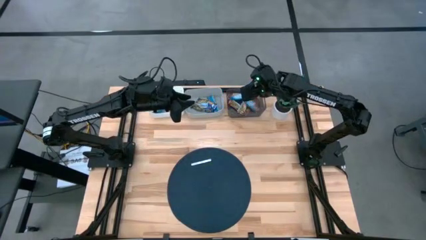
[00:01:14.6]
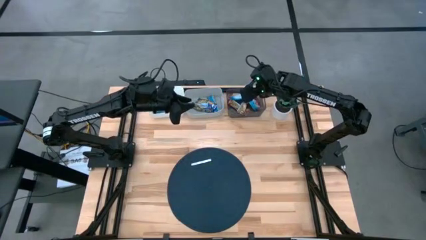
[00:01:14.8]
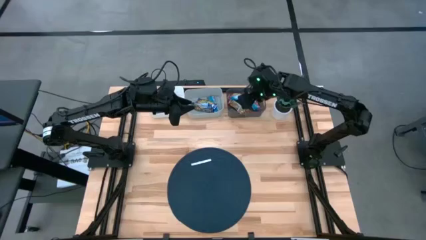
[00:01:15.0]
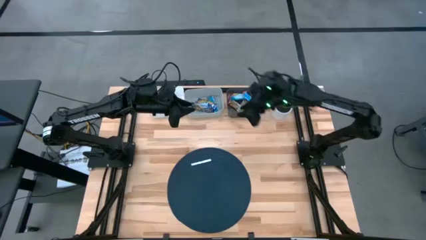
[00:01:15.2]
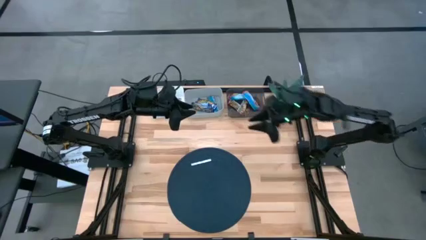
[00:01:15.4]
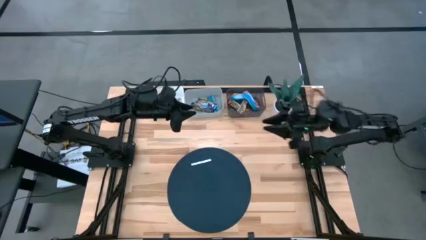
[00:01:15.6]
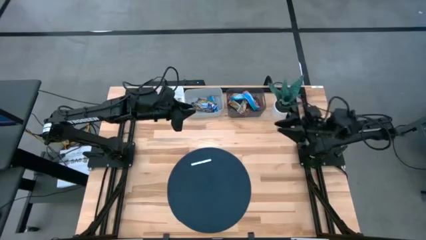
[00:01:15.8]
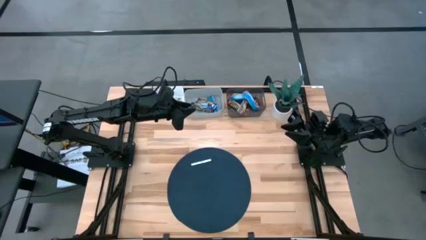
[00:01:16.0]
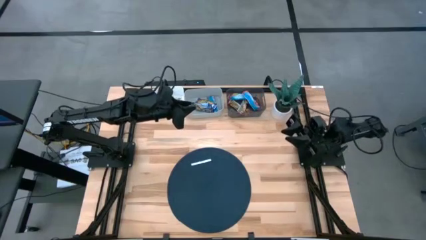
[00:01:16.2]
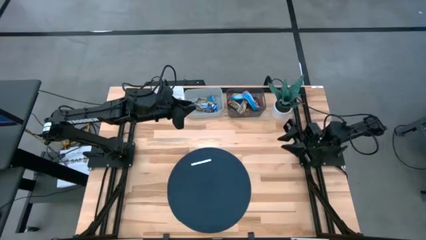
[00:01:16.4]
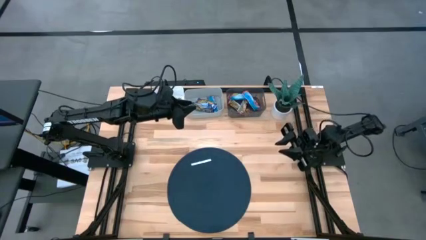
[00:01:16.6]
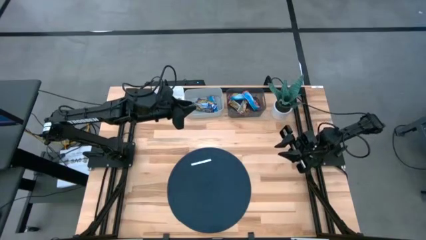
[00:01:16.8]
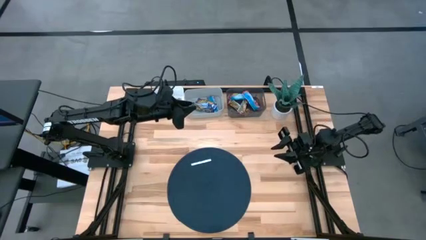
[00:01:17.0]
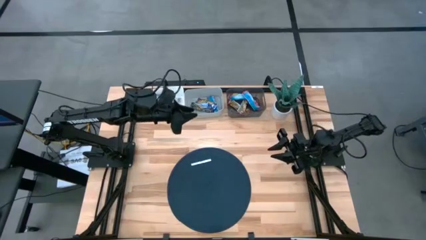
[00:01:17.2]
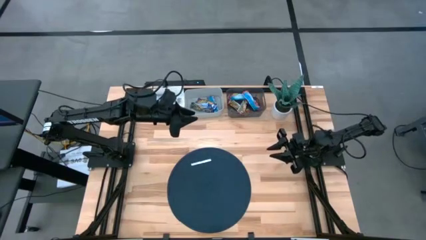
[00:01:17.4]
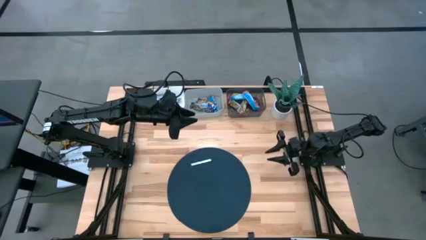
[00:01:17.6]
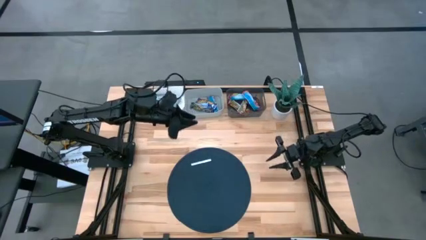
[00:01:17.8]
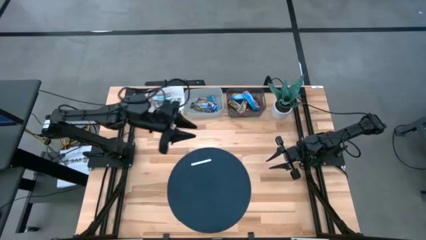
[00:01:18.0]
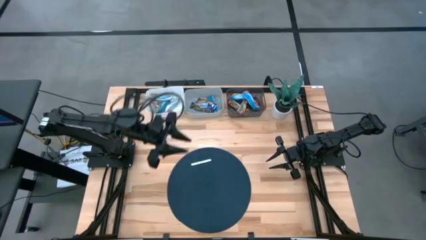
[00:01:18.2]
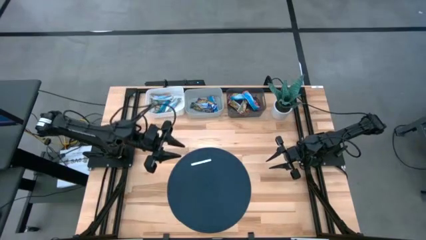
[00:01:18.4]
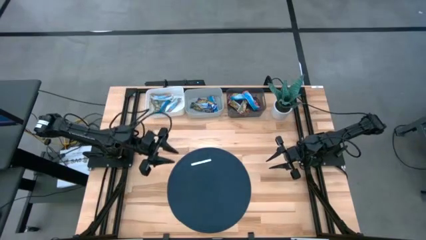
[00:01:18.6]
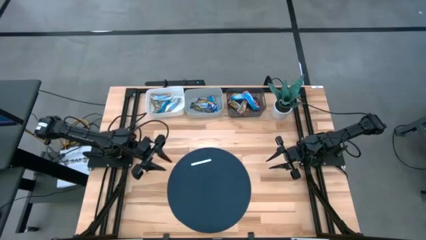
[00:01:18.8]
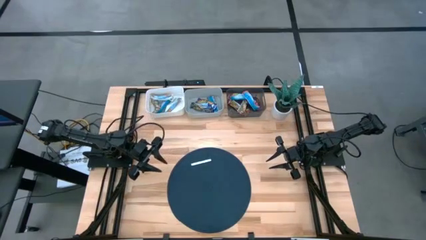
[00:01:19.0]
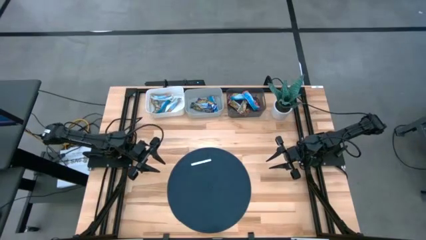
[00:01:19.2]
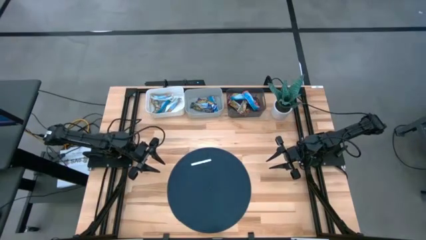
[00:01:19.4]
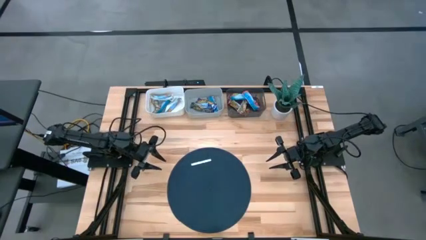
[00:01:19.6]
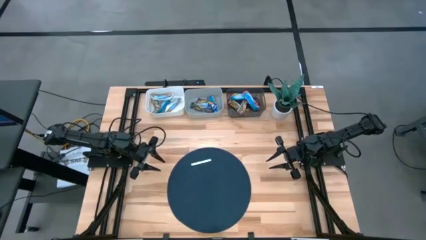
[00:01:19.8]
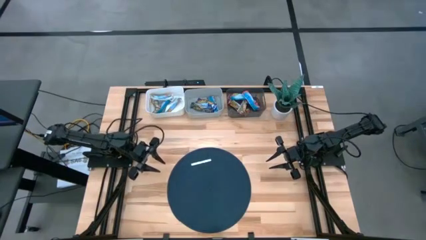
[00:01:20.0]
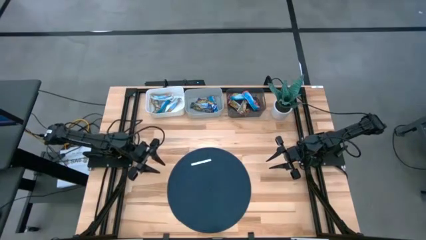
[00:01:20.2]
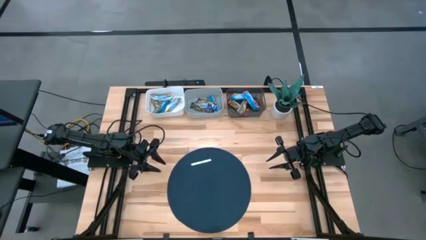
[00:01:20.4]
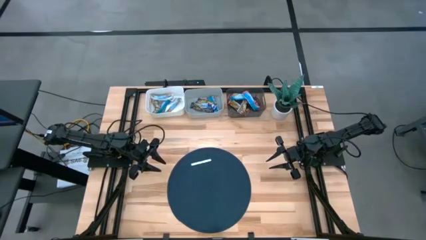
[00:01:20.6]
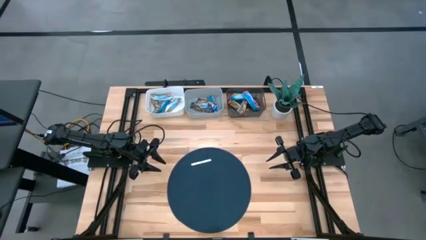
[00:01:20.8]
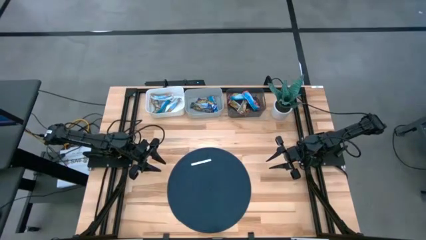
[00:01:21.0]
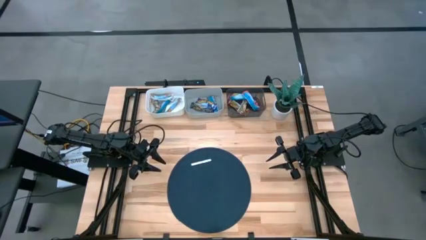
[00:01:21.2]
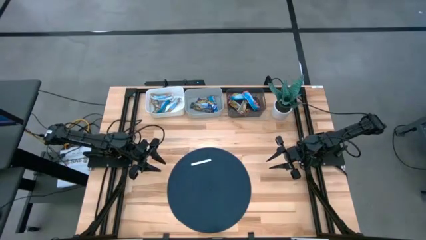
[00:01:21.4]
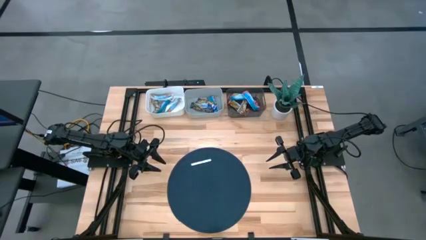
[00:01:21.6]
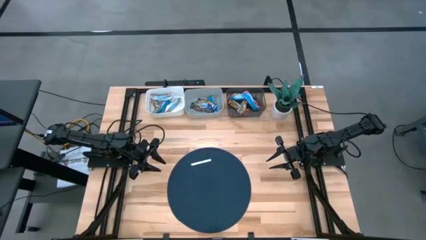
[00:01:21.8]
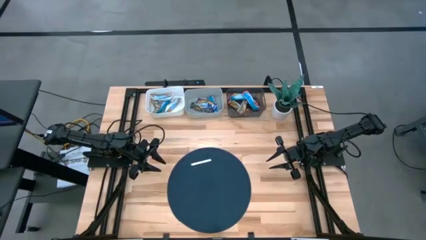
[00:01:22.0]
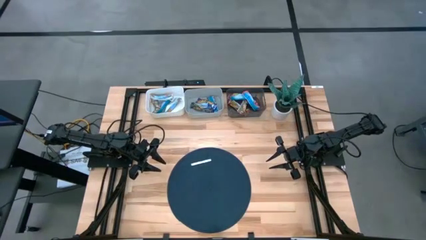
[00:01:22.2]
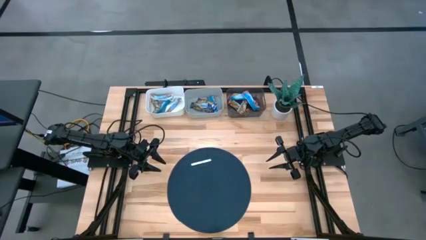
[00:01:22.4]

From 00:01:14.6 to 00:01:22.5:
Task: Pick and place Granola Bars by type
Return to Home Position

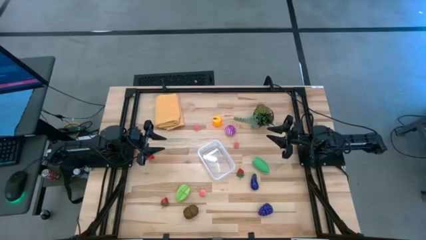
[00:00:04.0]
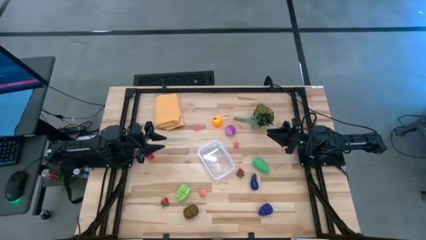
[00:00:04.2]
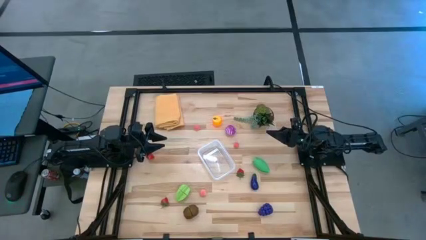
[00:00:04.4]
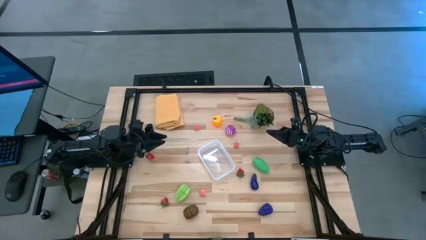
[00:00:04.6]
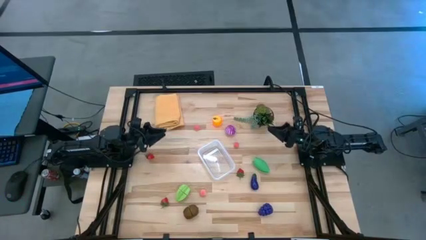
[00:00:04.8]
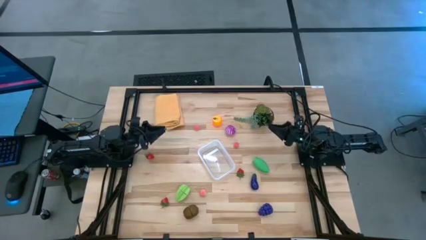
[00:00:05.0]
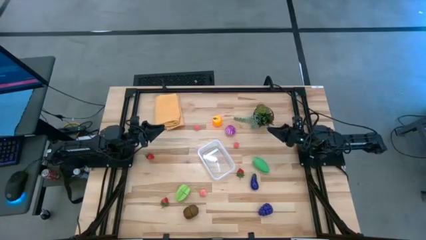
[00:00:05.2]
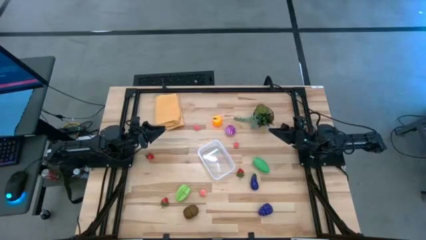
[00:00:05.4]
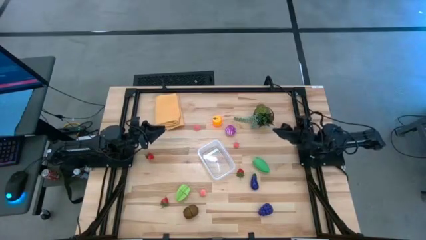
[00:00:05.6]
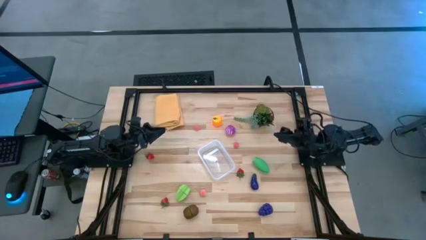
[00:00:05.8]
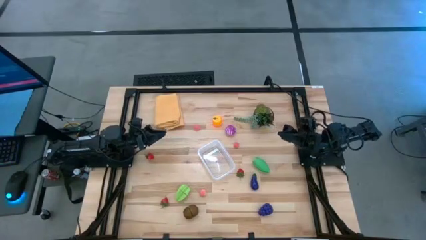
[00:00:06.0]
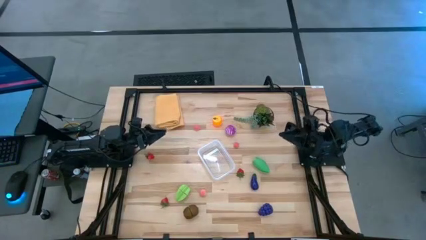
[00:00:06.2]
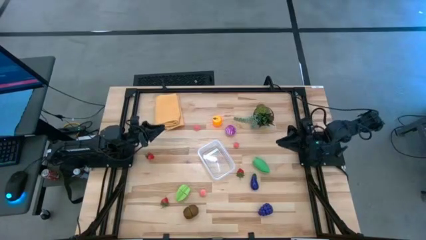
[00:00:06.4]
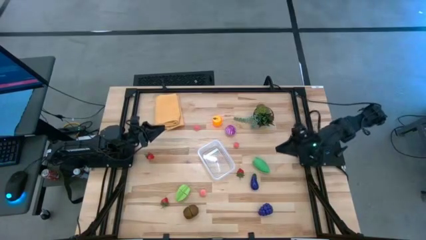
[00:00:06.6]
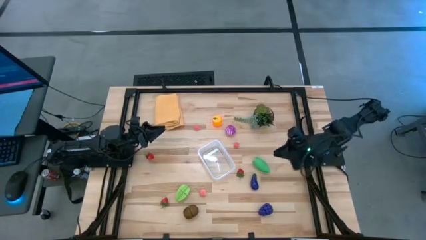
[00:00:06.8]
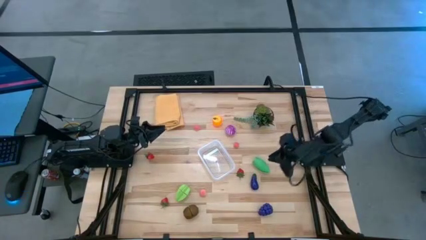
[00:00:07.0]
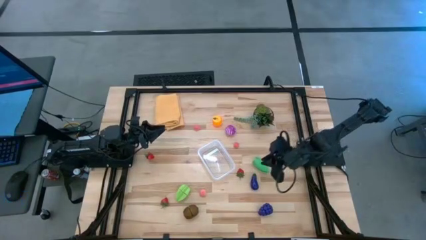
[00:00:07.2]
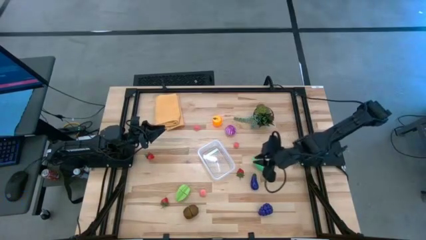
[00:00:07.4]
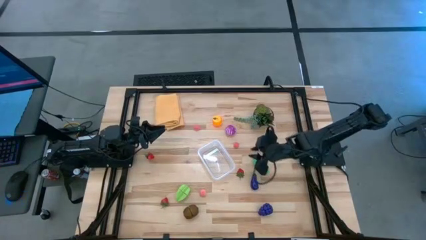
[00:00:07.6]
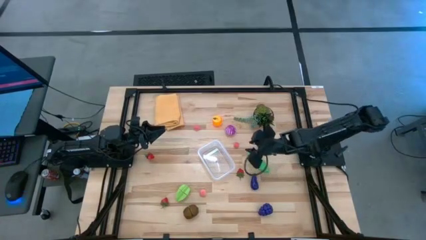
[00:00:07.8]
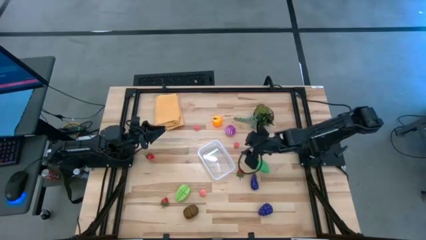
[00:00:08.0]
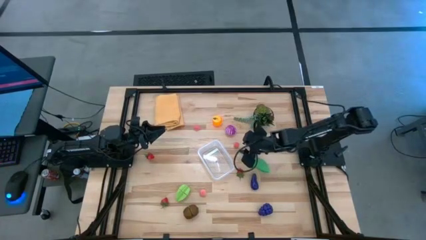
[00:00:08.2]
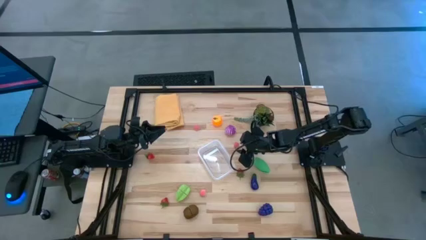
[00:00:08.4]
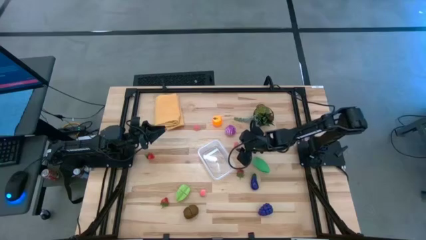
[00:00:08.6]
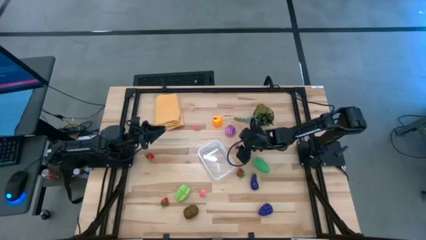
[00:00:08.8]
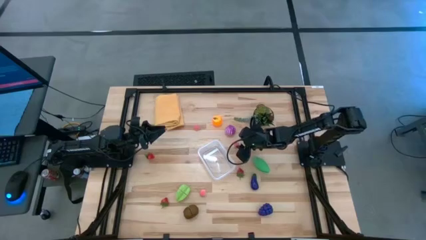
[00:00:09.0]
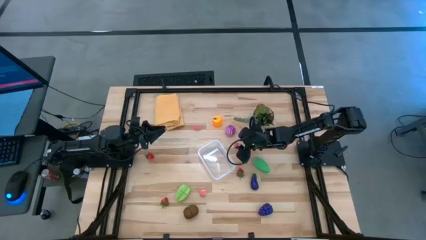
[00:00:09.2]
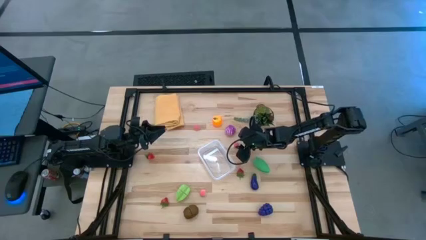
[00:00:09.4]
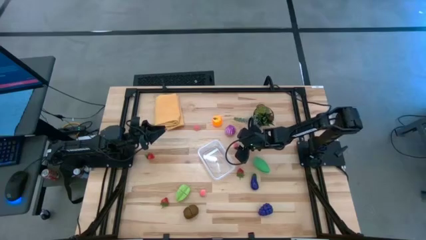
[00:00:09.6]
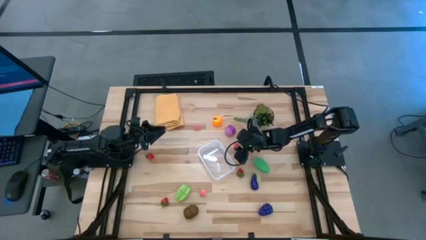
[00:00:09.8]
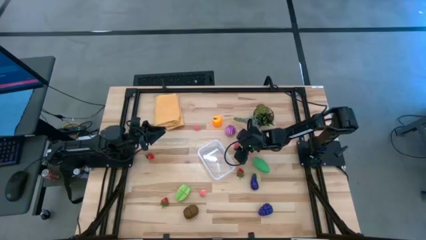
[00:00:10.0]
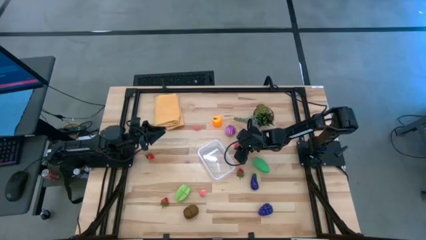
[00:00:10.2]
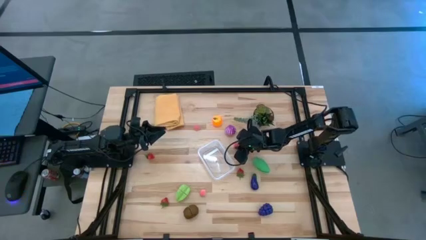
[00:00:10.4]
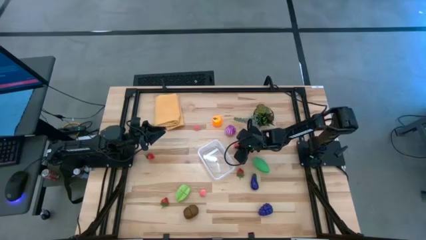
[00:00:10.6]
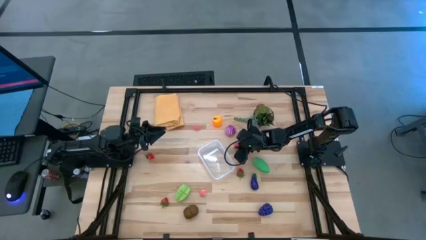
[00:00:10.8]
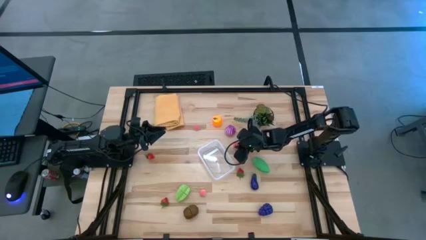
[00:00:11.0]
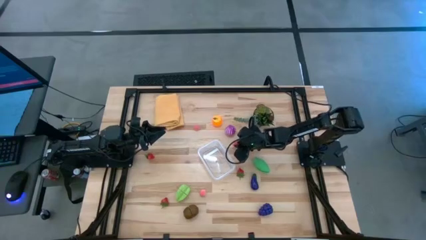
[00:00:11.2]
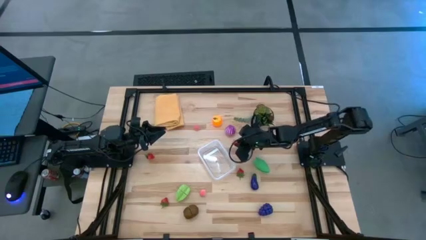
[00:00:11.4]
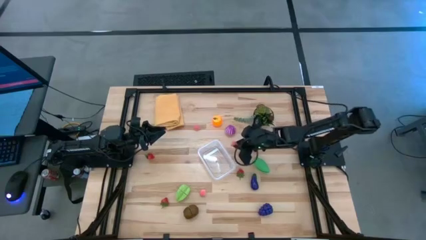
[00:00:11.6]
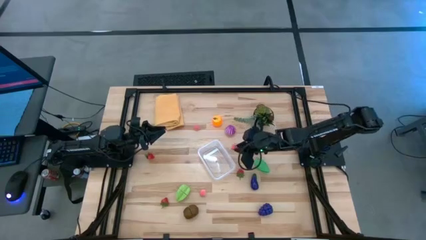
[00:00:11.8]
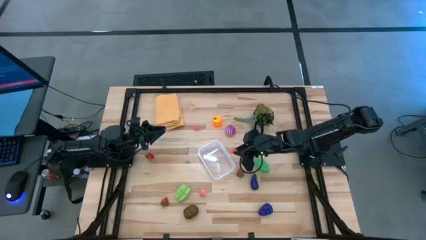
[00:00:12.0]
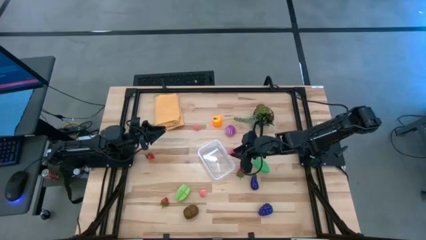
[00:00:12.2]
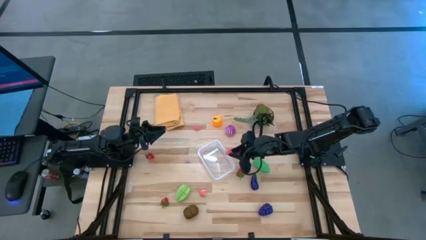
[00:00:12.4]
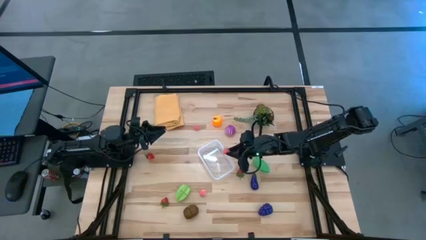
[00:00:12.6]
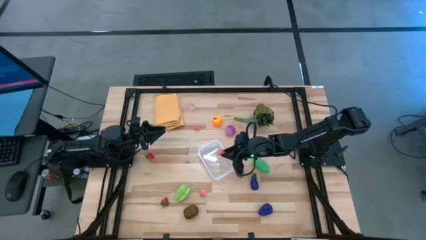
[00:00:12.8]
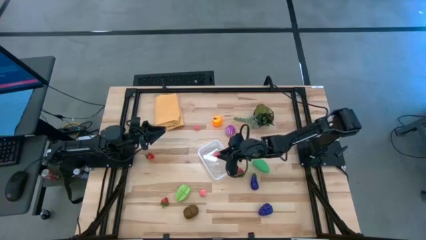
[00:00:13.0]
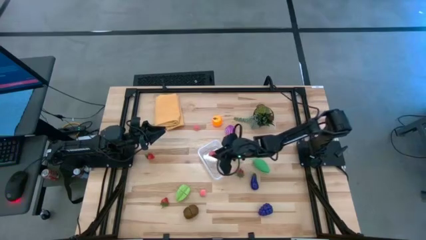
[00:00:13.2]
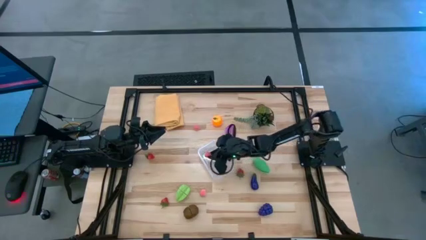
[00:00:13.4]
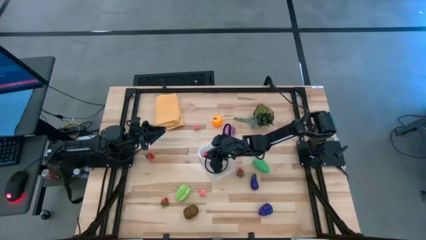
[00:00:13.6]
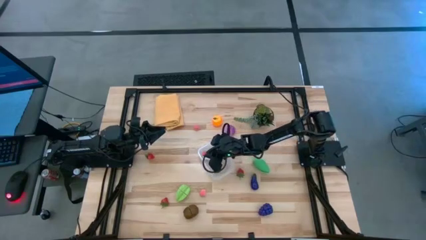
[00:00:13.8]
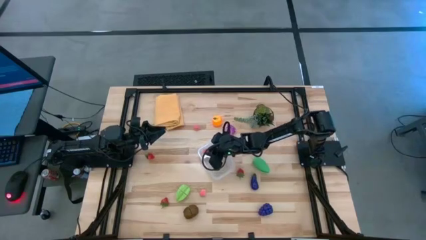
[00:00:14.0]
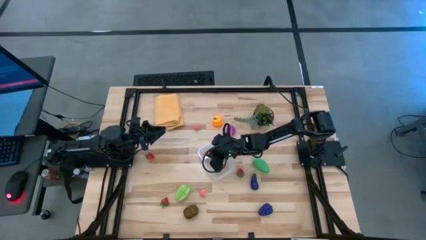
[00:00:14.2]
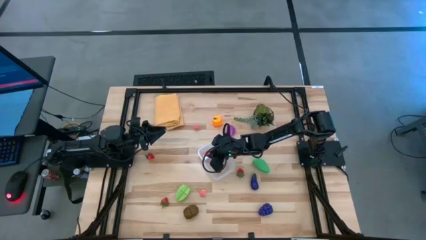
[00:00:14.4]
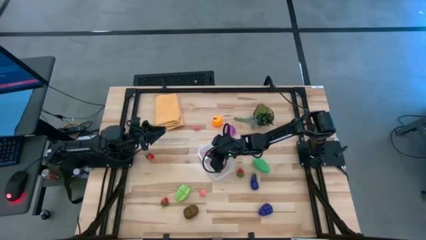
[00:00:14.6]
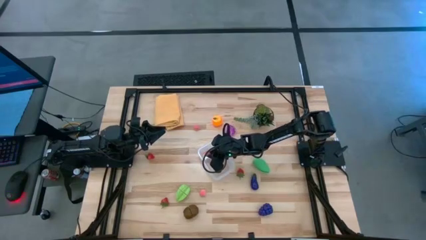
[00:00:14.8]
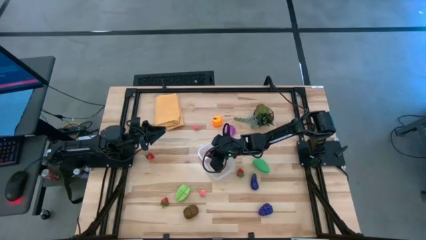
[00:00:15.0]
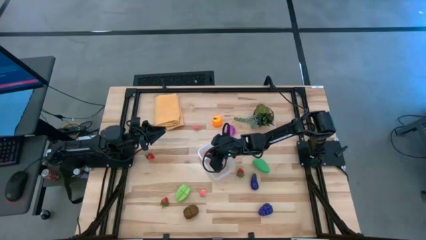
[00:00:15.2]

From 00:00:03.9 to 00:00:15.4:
Task: Pick and placing Produce into tupperware
Put the middle right pink peach into the transparent bin
